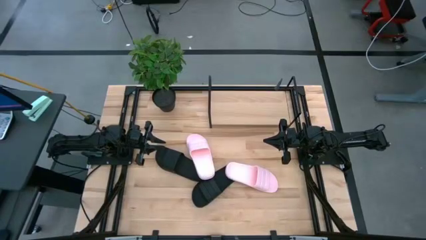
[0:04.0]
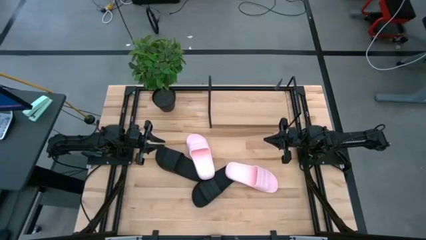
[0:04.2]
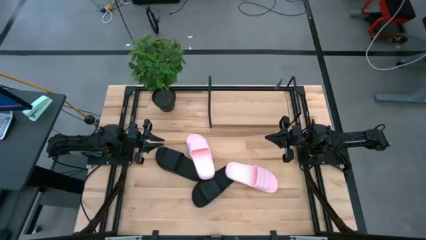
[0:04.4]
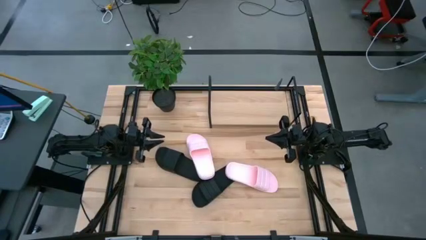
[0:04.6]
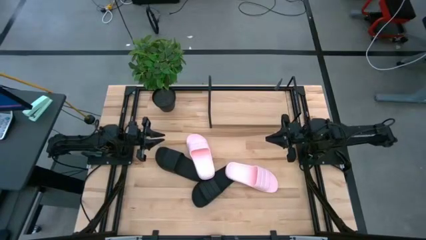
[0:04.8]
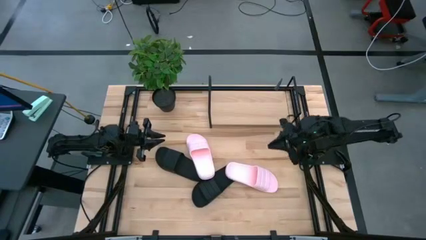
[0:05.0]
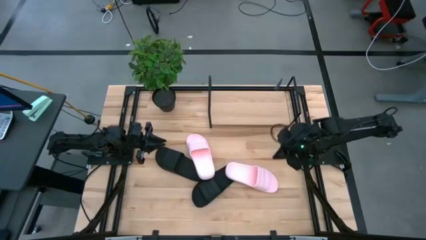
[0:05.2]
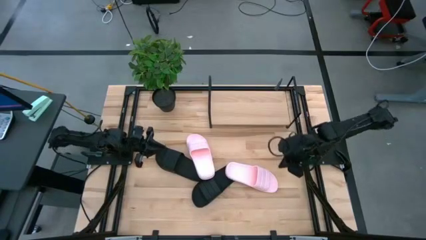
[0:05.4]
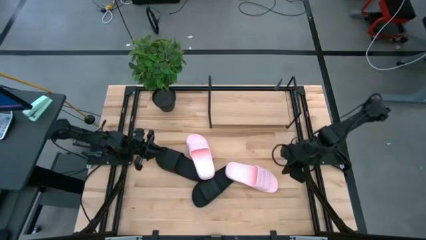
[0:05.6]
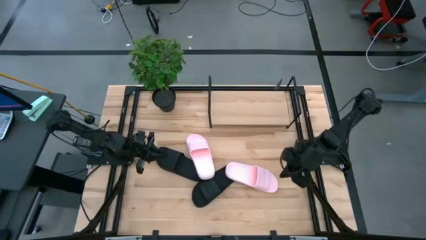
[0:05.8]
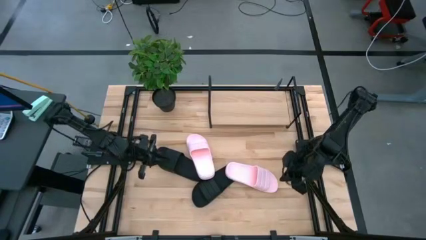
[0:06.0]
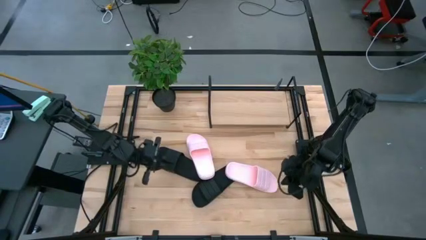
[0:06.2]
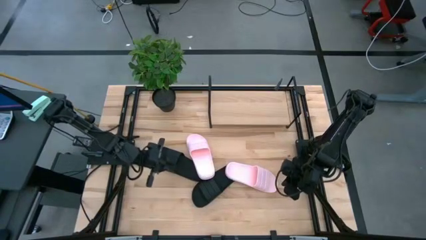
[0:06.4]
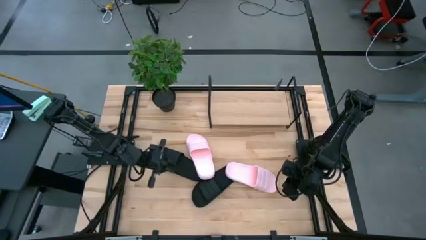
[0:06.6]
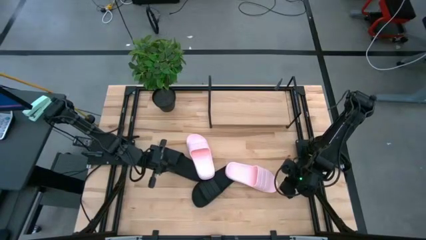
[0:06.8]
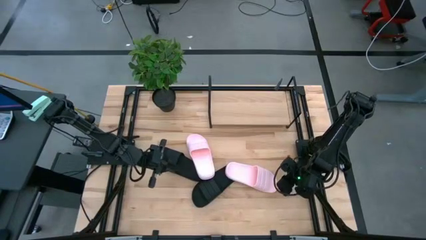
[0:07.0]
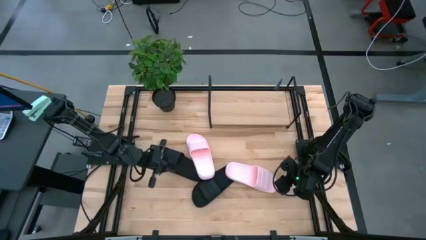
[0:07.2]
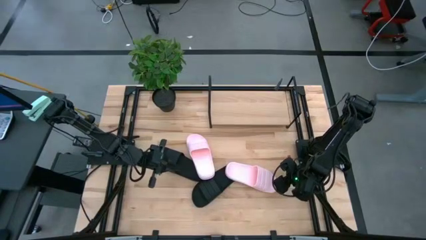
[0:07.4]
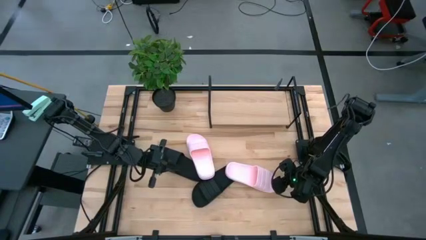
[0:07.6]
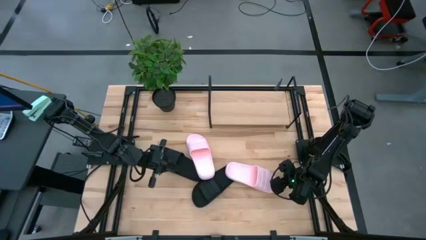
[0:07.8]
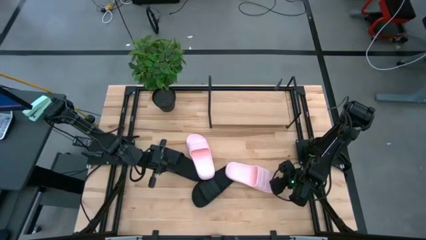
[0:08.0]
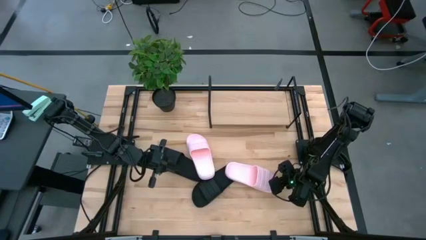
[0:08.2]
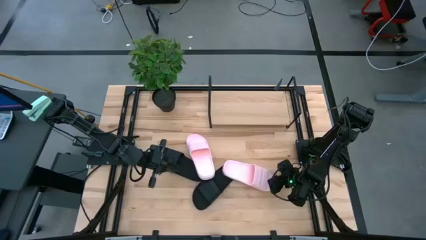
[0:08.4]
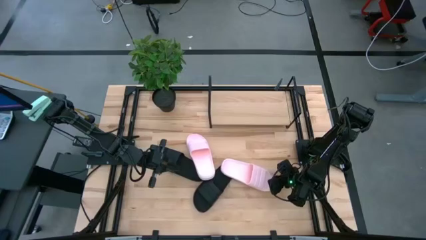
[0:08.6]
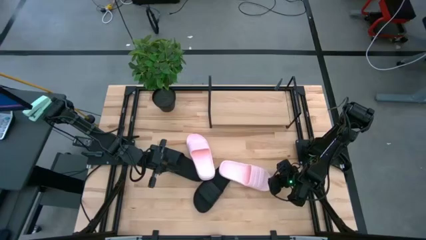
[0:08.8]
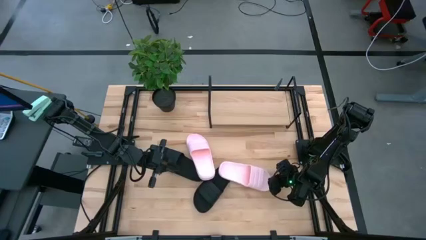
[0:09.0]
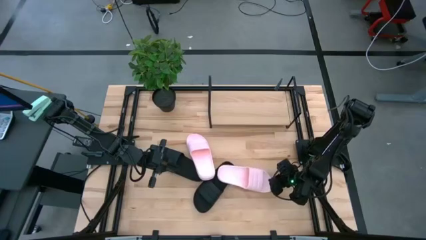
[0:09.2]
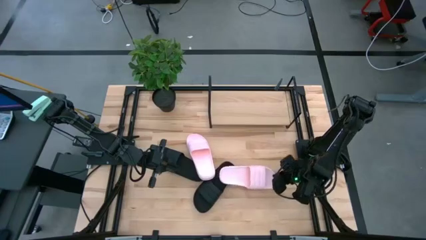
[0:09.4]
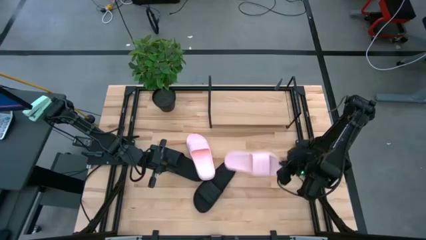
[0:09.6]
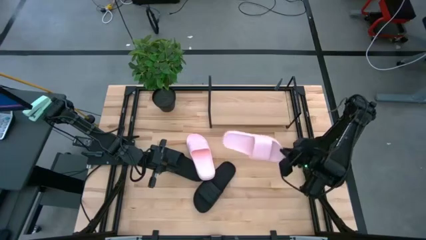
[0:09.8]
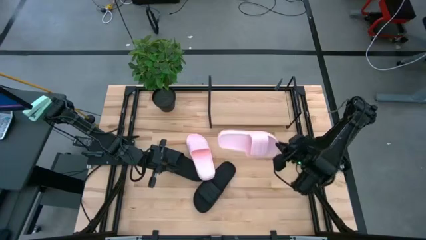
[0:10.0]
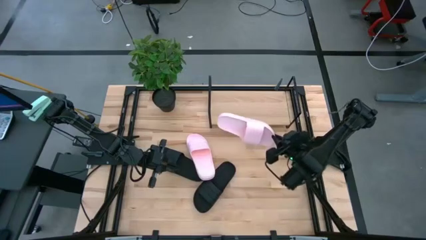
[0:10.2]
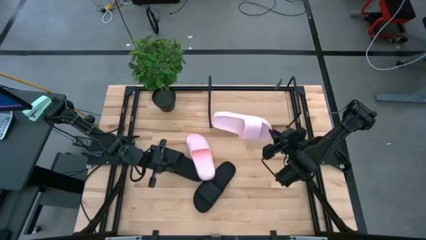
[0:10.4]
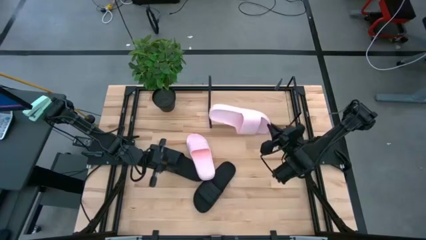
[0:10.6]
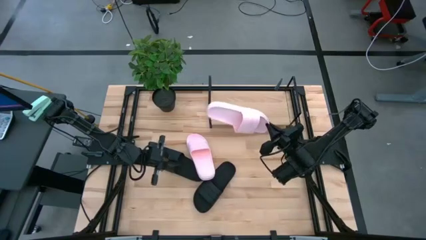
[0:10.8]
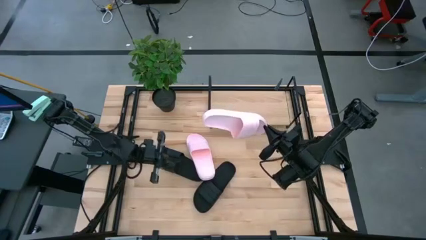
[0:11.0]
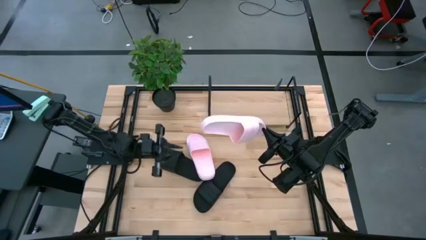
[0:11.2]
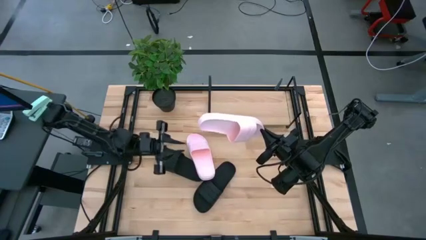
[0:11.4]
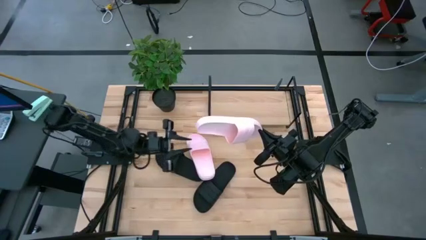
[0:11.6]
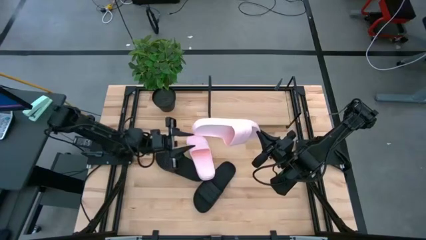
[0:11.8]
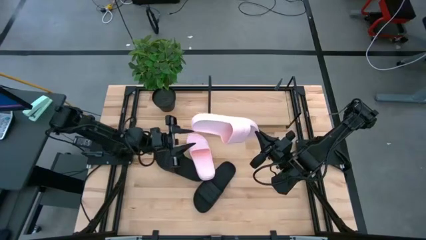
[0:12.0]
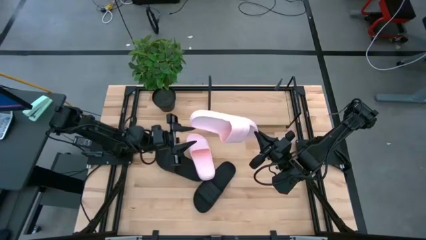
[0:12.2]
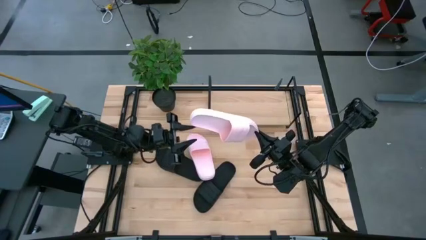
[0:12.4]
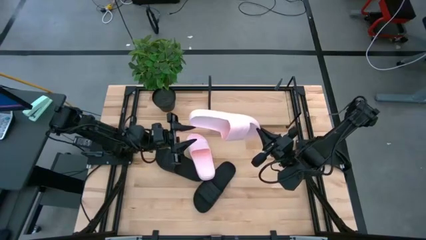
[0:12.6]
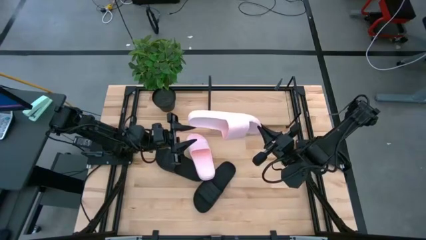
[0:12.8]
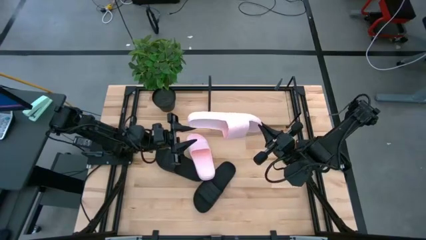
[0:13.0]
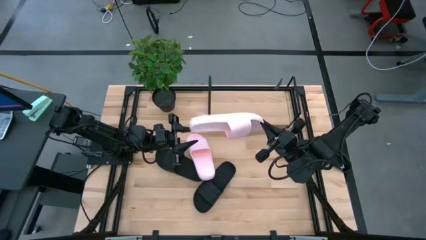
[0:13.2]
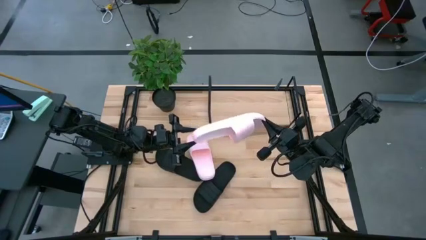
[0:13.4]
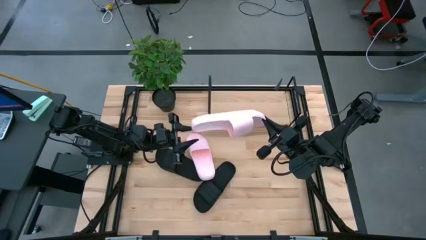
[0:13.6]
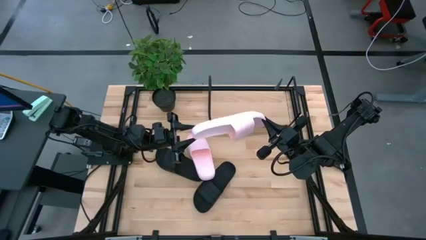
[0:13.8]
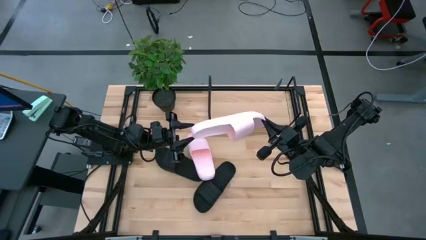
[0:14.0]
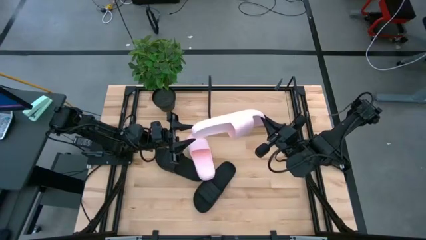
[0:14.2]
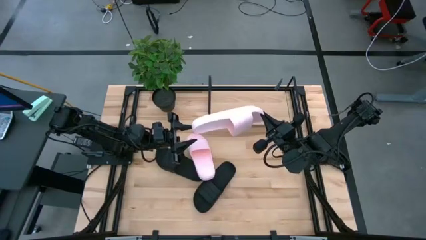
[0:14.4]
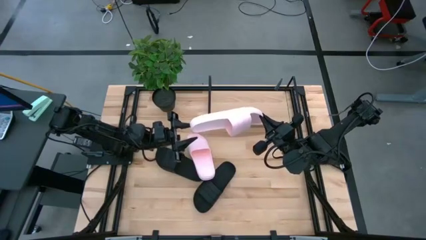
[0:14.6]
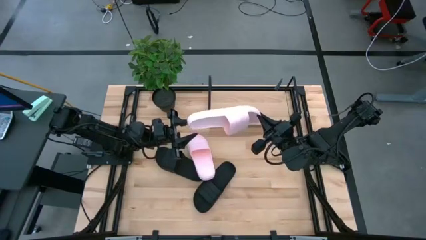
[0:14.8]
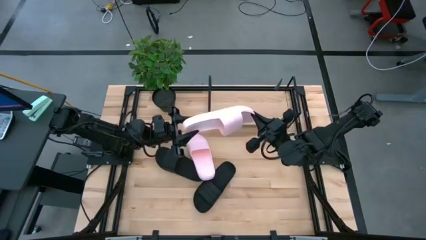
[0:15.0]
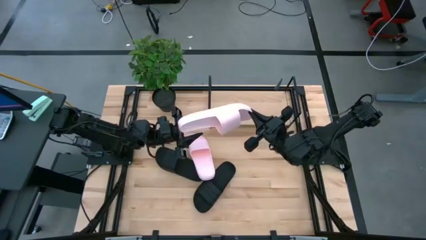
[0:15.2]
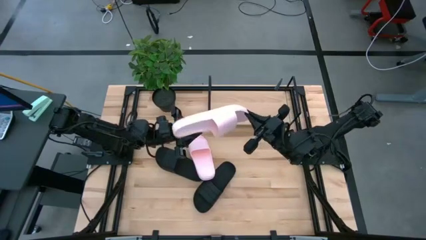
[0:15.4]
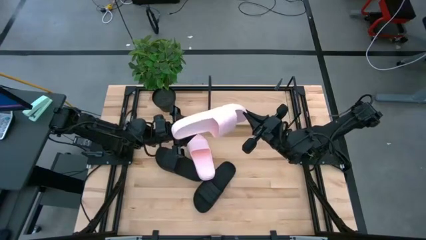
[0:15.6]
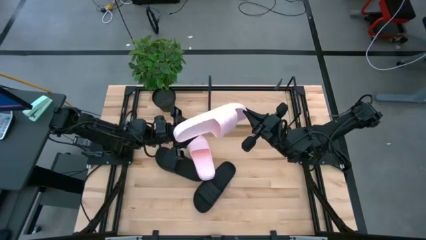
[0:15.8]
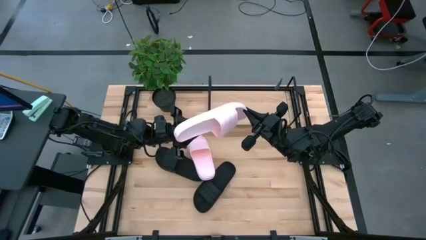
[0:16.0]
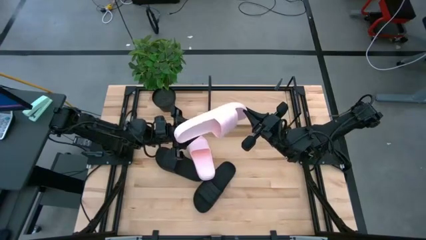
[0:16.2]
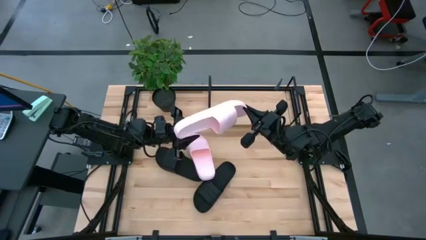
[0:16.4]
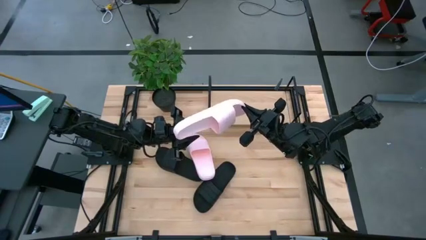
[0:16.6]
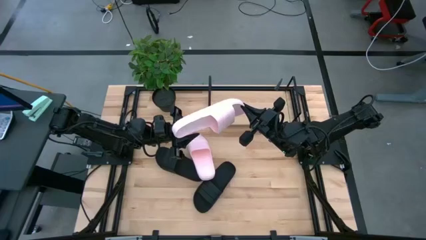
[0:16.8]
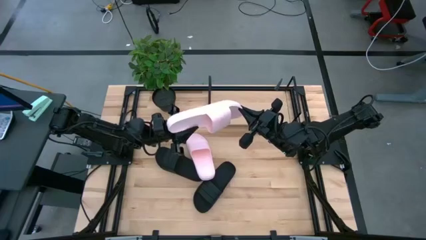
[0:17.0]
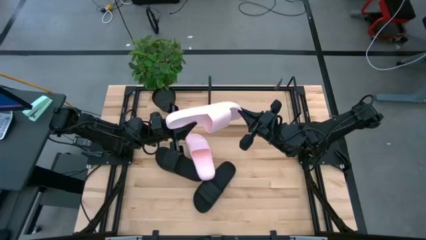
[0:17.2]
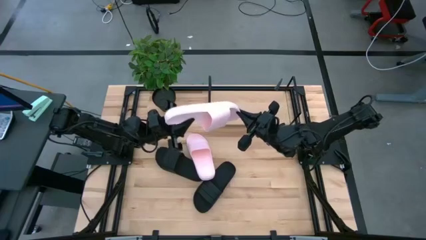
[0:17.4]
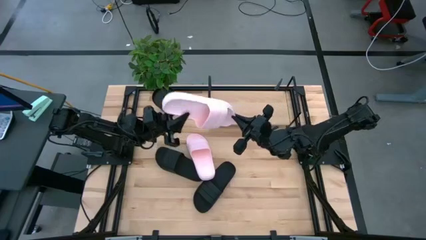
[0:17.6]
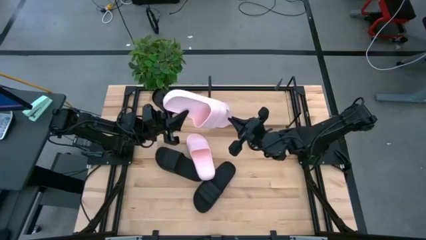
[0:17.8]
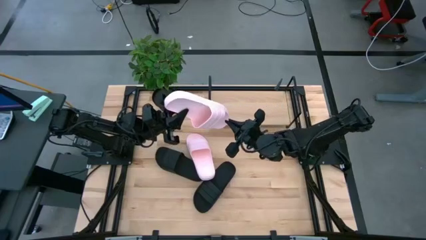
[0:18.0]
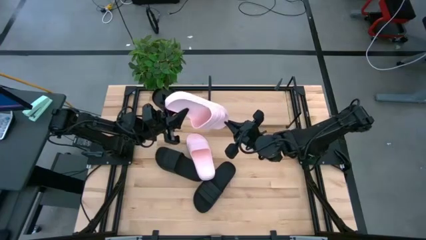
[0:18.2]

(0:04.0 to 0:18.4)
Task: Pick and place slides into the shelf
Put the right pink slide on the shelf
